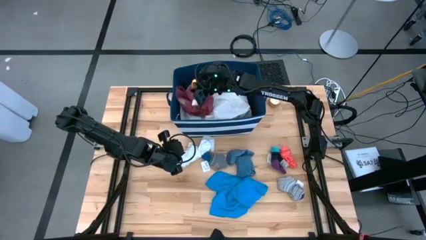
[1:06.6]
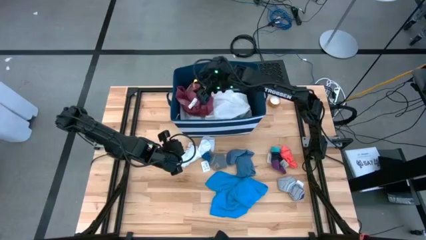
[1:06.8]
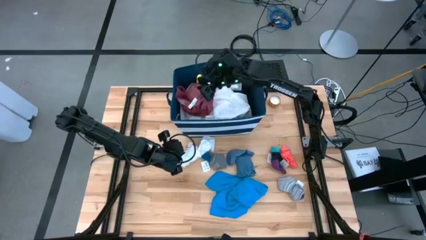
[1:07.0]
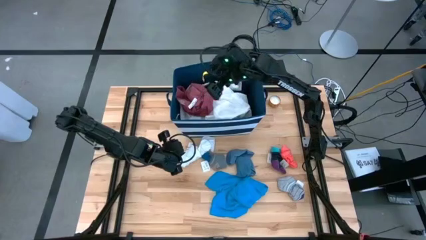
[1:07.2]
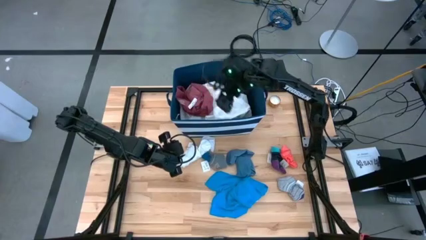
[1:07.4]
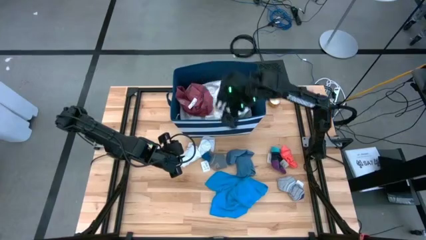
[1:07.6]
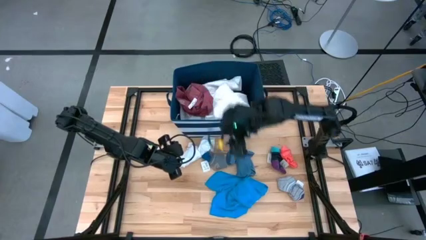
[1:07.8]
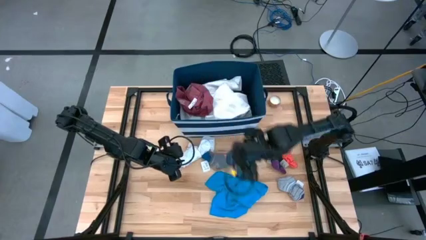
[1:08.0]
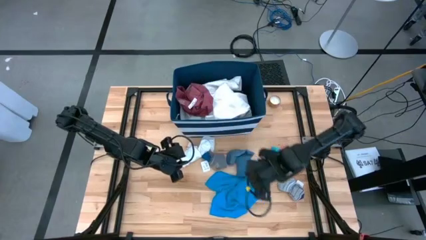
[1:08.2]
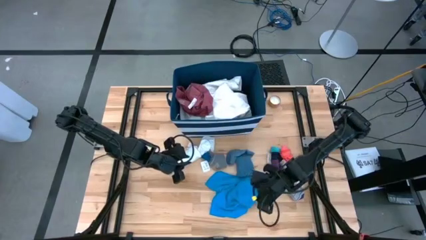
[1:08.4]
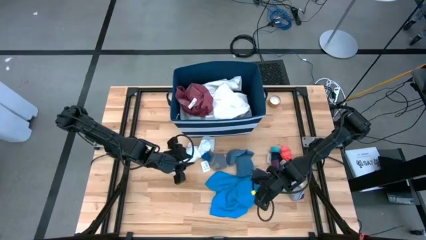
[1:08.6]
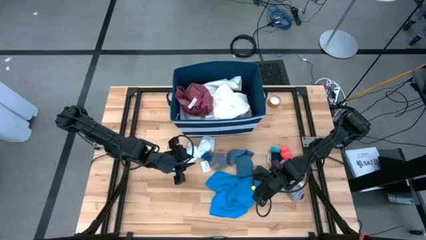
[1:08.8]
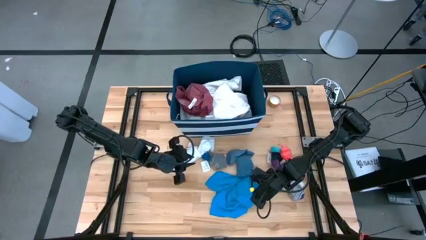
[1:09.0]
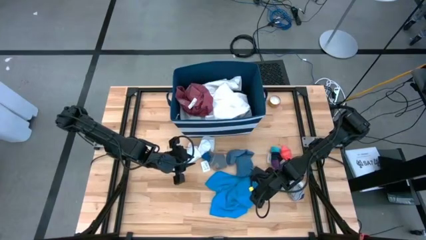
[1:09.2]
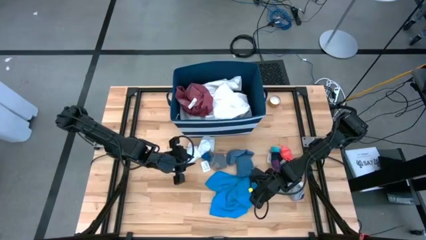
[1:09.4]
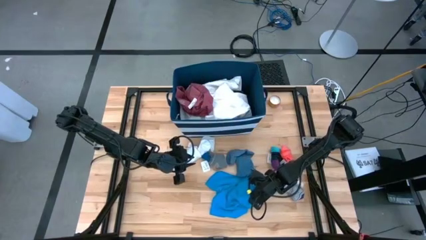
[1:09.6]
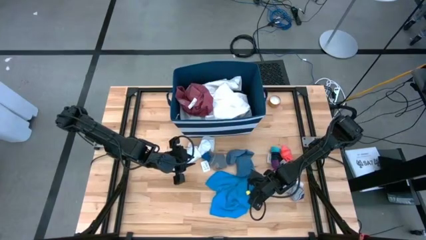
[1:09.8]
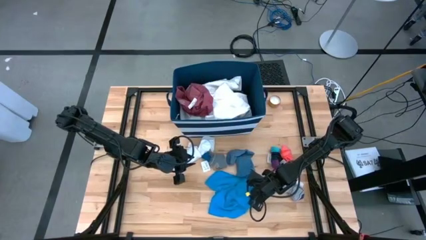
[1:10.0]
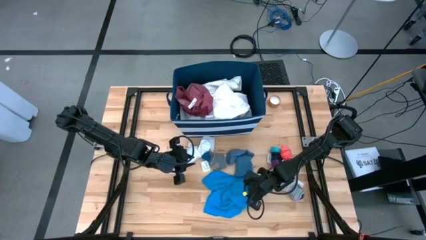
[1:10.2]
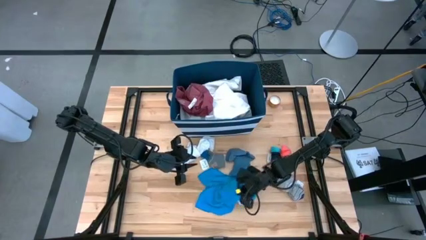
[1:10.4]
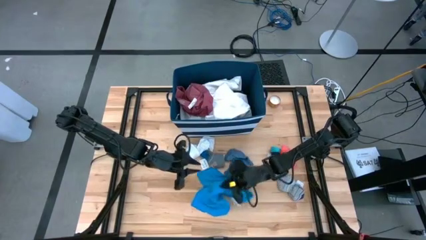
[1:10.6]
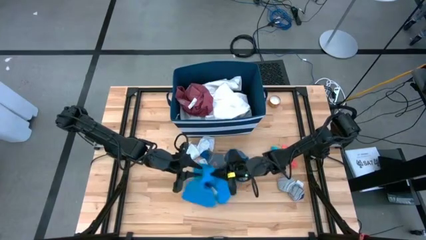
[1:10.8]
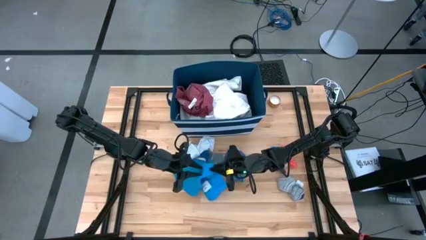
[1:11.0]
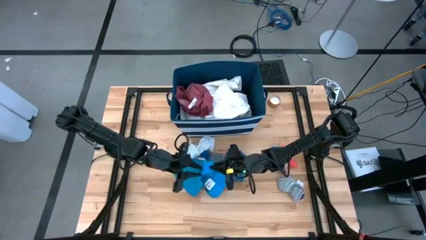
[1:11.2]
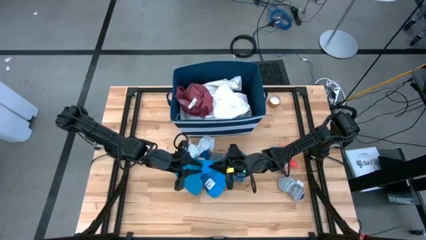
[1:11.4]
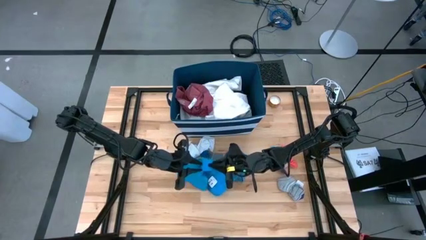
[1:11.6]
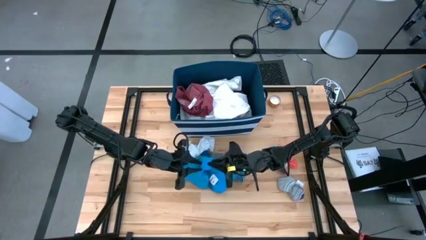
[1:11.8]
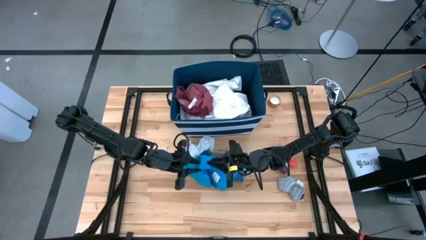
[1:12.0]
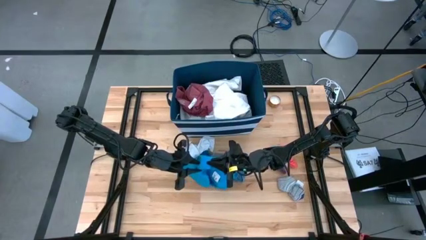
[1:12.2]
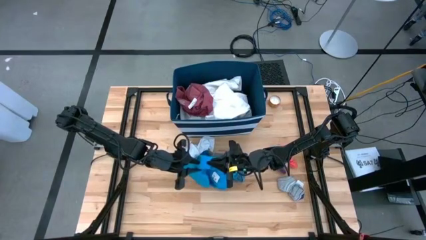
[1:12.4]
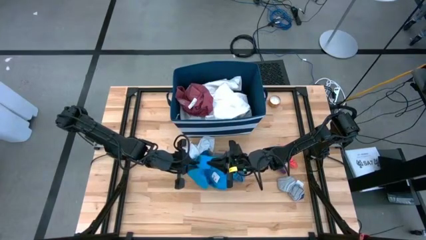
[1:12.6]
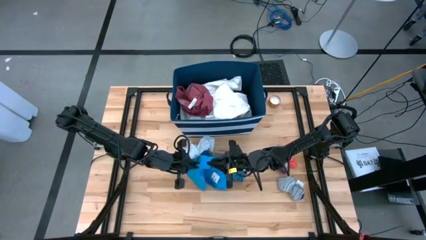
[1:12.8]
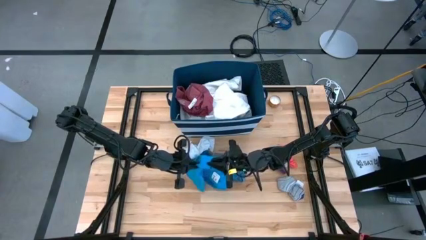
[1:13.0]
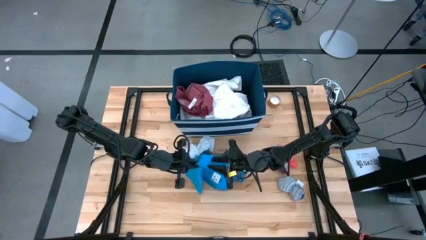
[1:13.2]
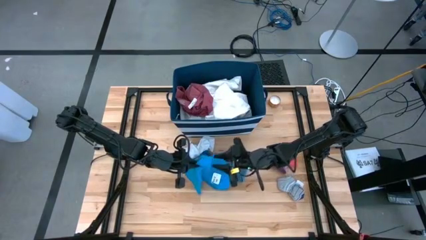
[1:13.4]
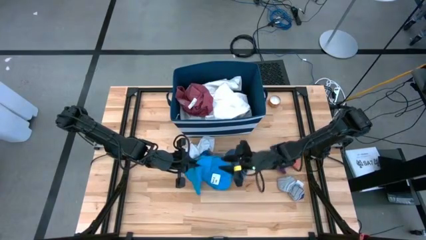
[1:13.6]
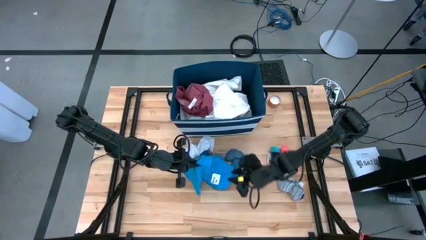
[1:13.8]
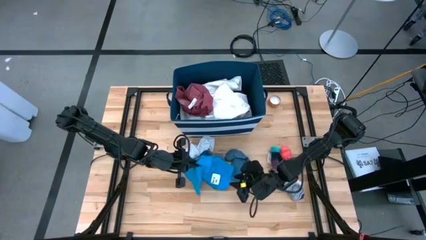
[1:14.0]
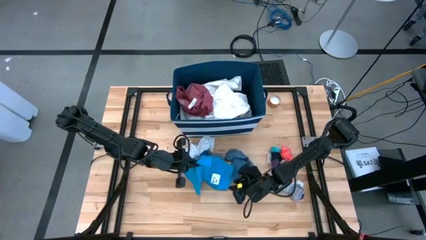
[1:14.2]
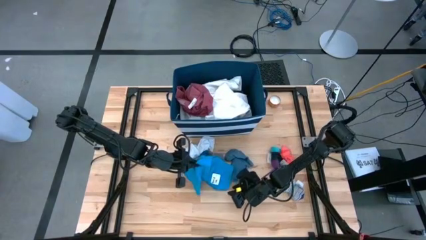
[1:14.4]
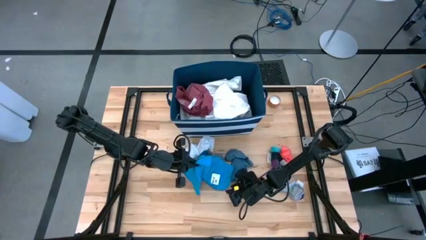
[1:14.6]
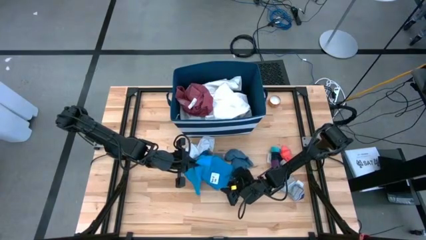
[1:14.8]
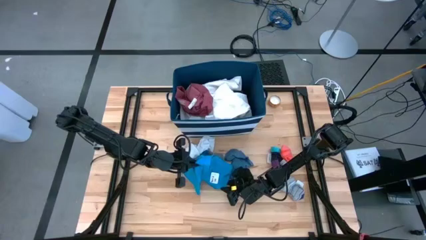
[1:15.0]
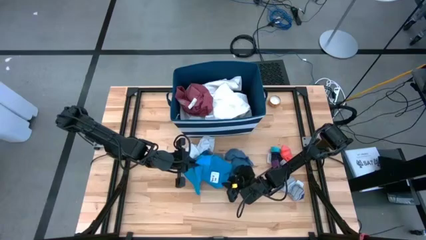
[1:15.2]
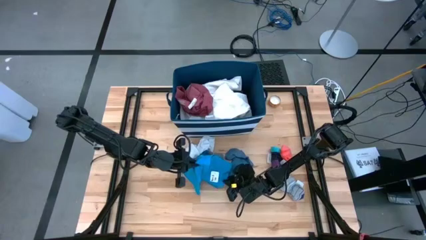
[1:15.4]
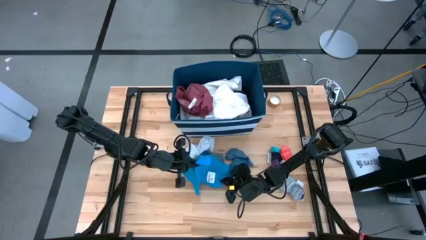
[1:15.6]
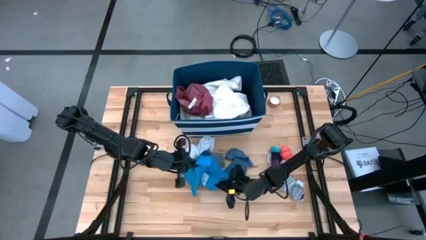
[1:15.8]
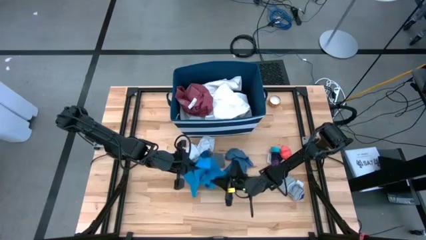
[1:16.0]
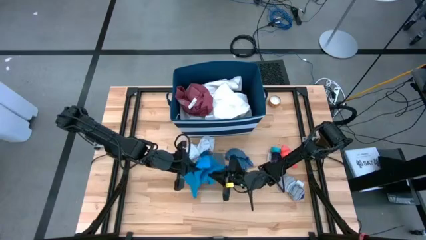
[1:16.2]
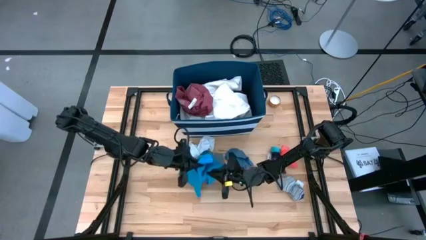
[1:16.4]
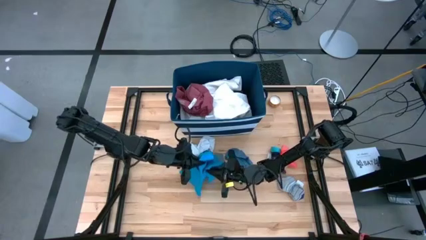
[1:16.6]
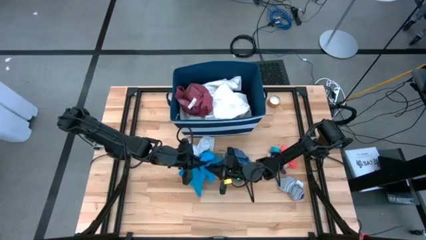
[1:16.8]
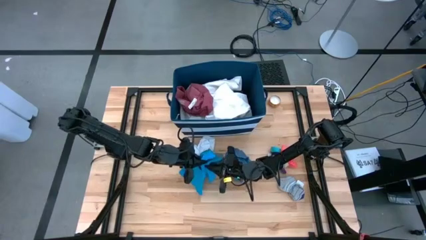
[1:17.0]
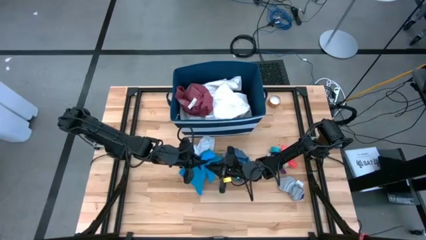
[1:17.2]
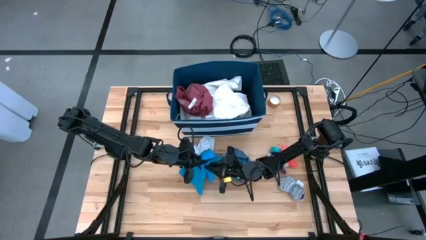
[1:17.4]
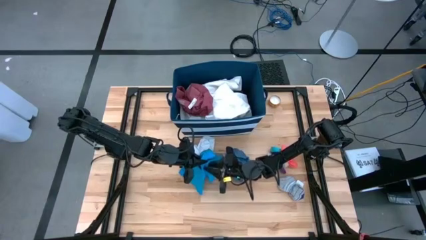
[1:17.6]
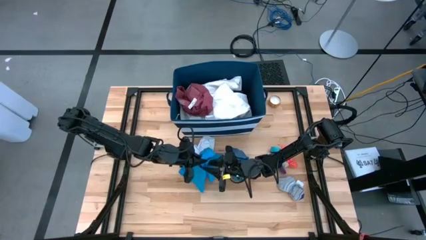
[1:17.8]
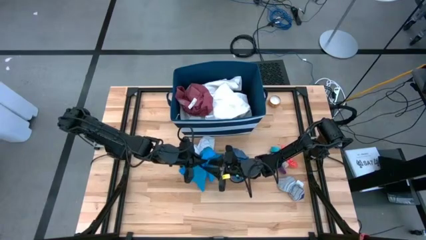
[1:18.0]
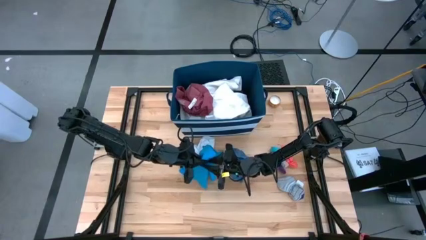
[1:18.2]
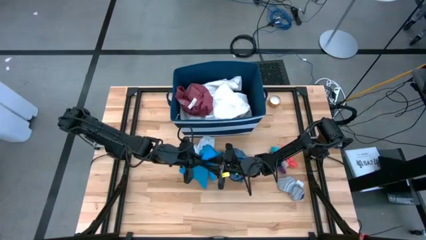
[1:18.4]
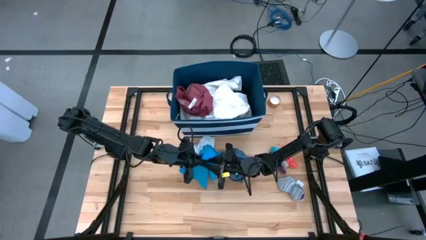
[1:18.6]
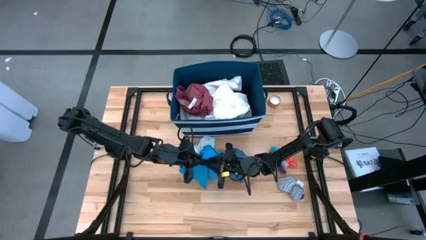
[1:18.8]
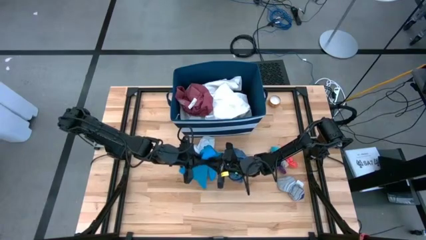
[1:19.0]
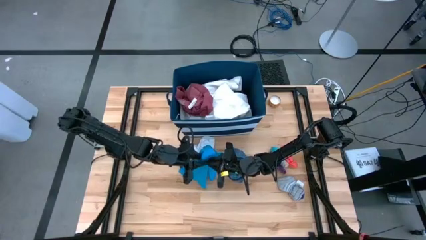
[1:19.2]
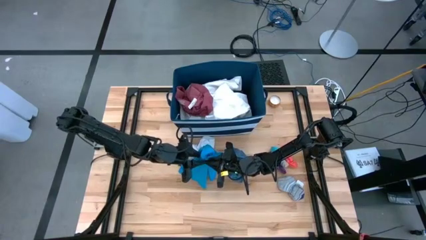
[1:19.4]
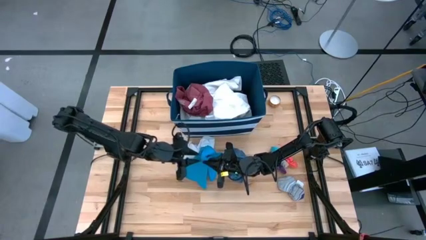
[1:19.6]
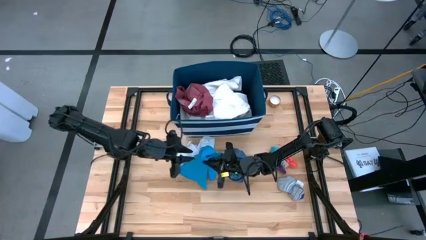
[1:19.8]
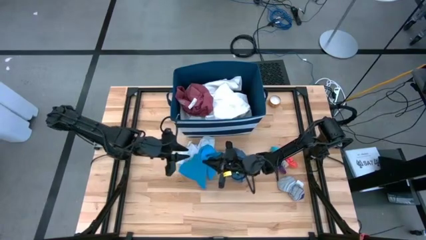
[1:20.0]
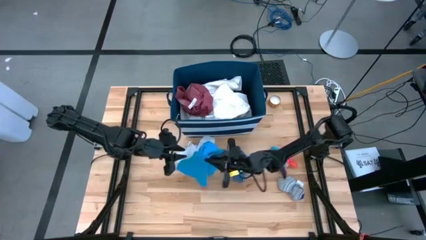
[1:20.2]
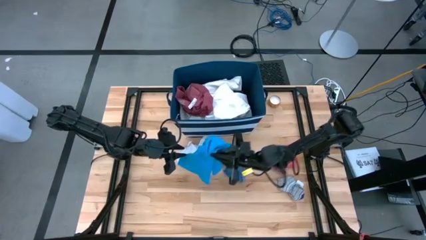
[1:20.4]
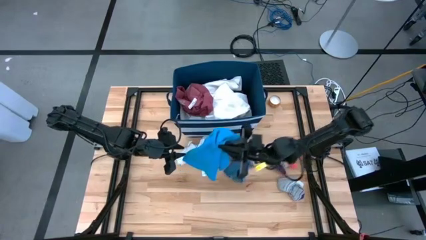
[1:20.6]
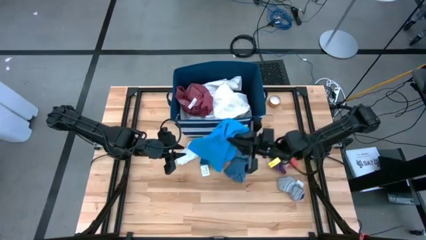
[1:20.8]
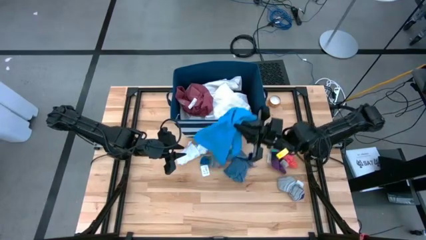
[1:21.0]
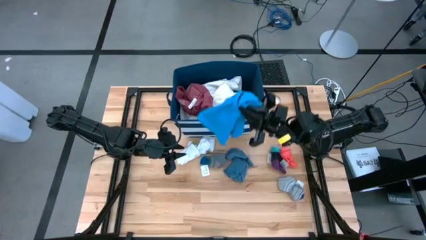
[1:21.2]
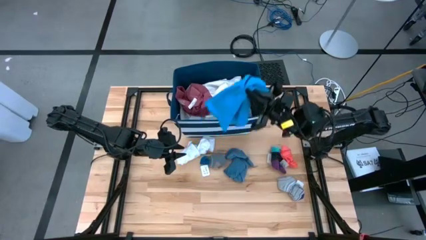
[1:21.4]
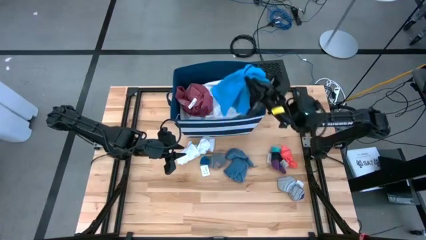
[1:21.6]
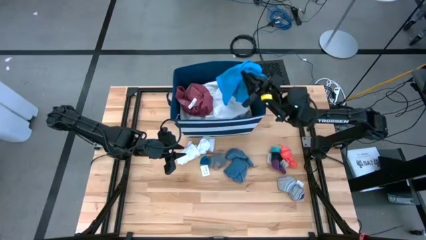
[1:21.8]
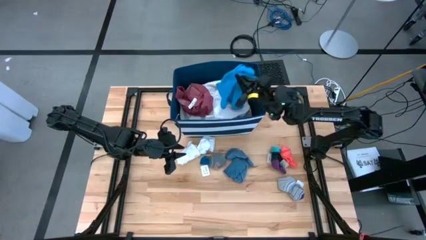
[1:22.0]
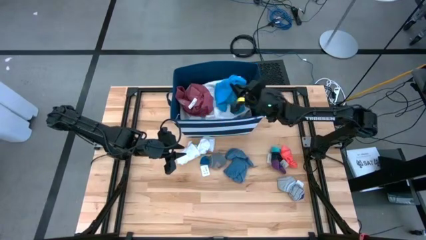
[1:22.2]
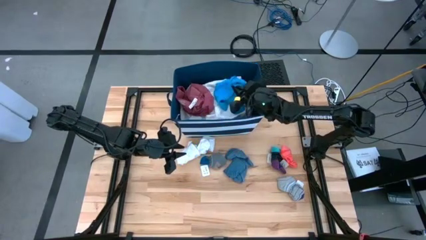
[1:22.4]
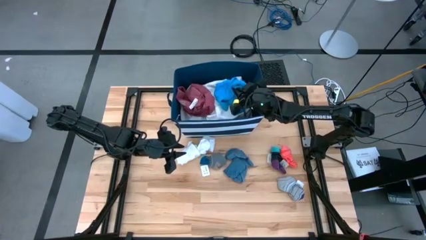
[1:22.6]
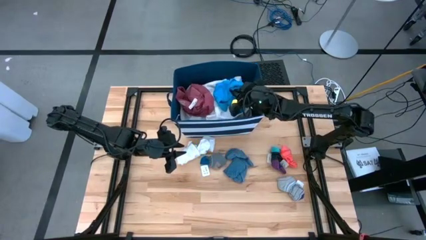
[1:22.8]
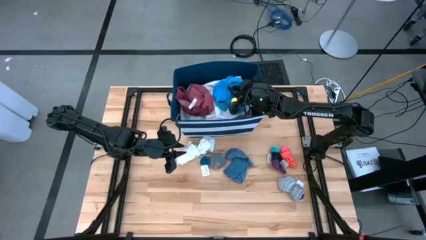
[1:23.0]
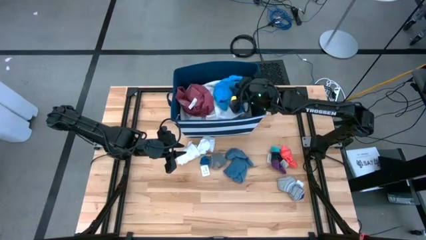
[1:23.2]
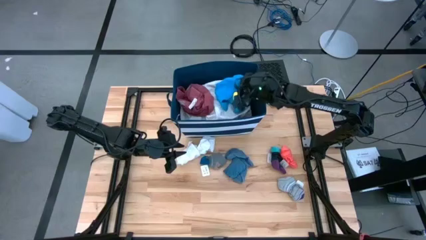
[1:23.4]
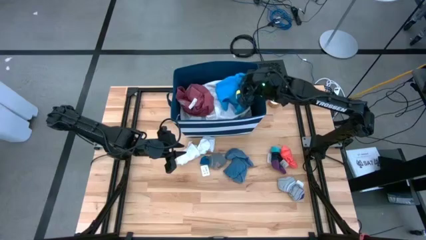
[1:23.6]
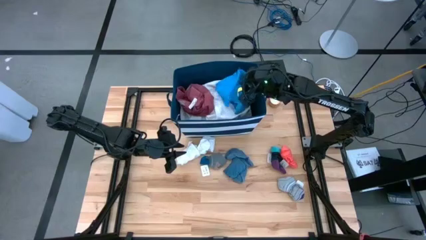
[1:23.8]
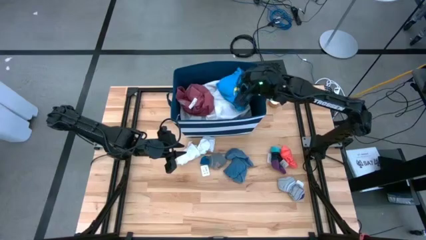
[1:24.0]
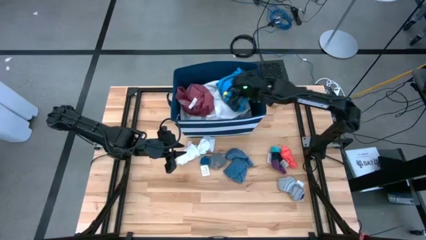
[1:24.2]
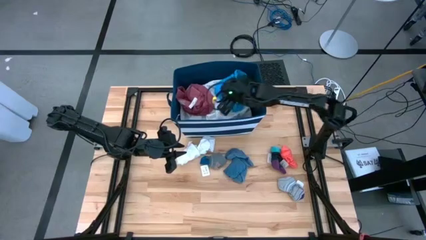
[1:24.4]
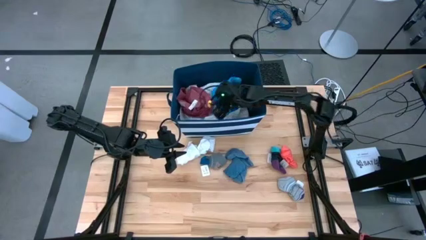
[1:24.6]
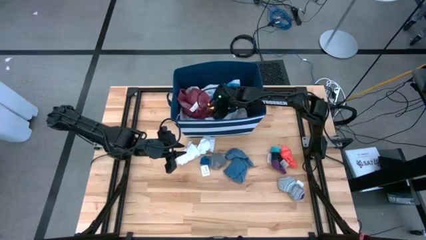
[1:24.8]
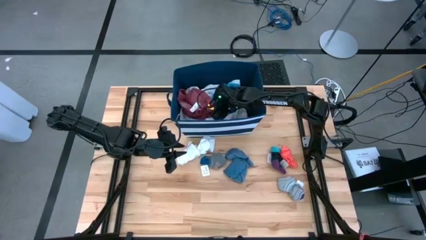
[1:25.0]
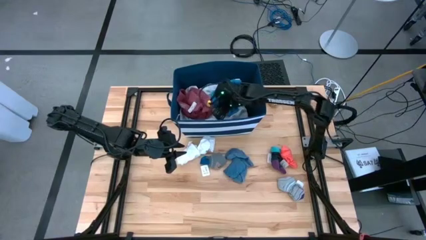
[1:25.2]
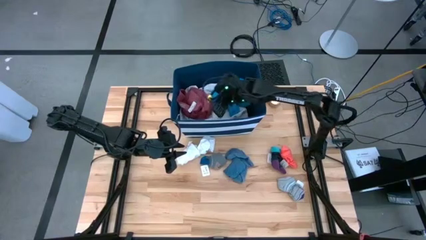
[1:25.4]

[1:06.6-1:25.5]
Task: Sort clothes
Put the blue shorts into the blue bin
